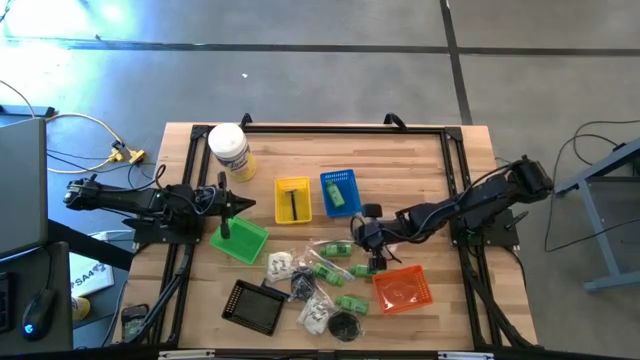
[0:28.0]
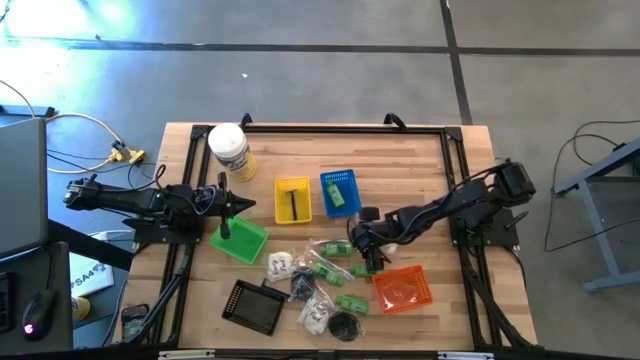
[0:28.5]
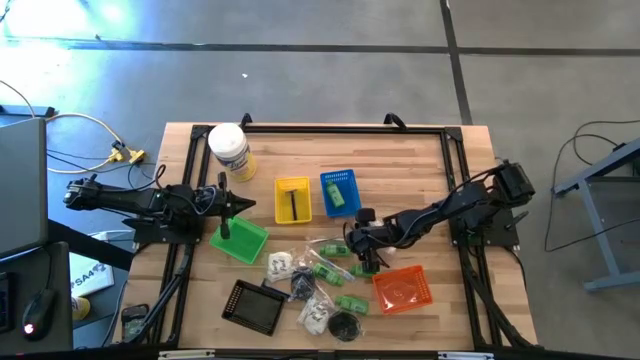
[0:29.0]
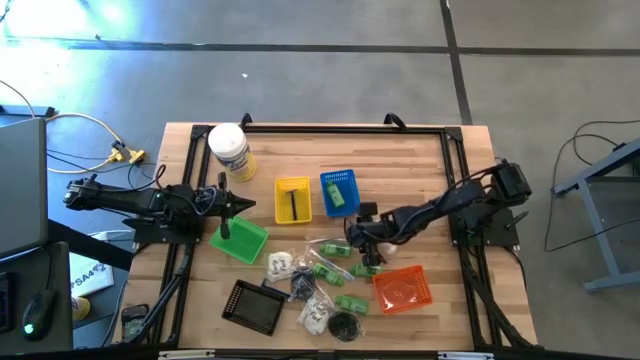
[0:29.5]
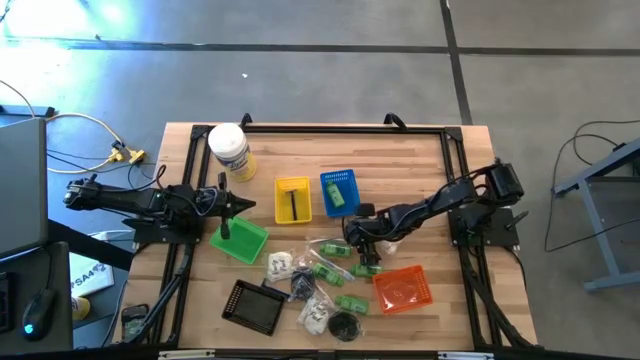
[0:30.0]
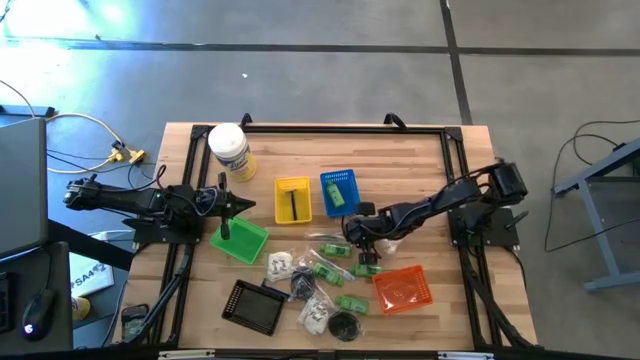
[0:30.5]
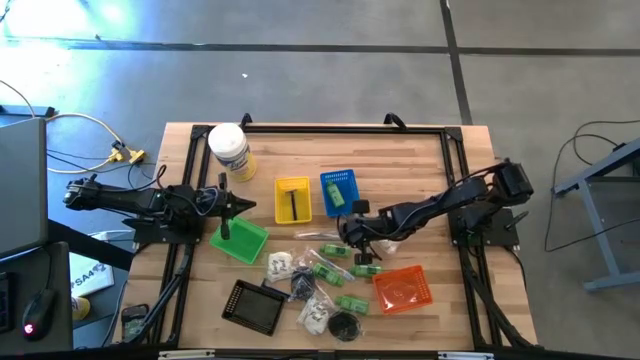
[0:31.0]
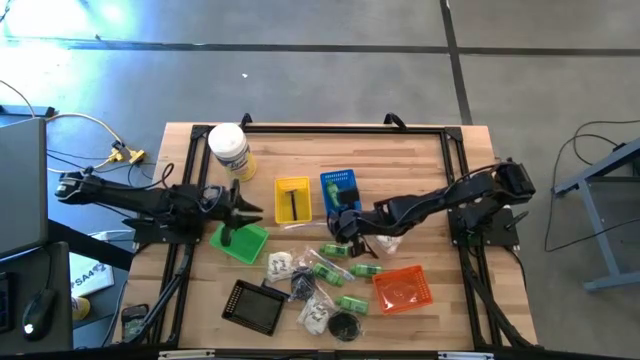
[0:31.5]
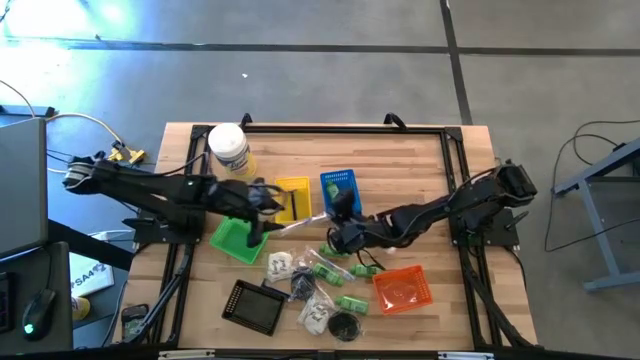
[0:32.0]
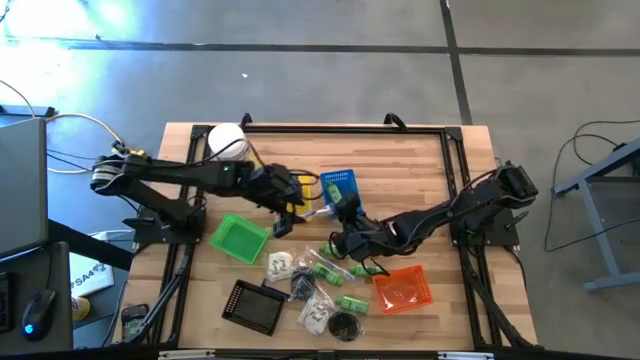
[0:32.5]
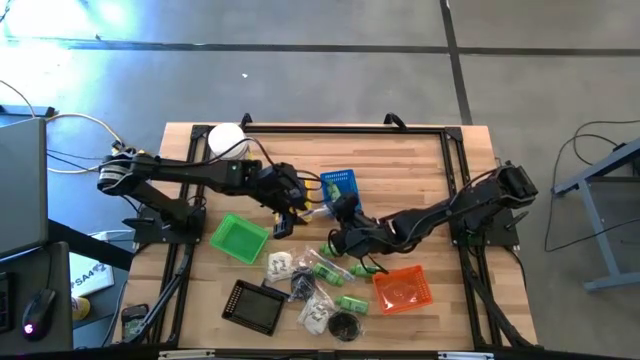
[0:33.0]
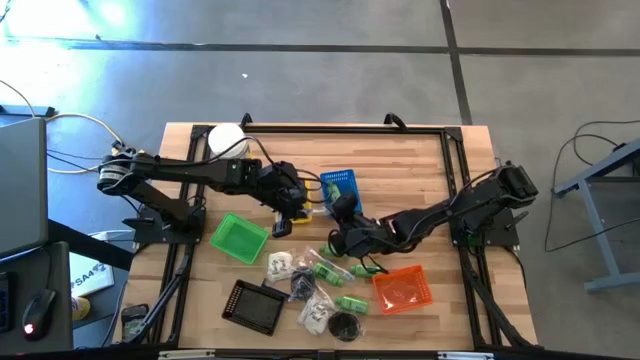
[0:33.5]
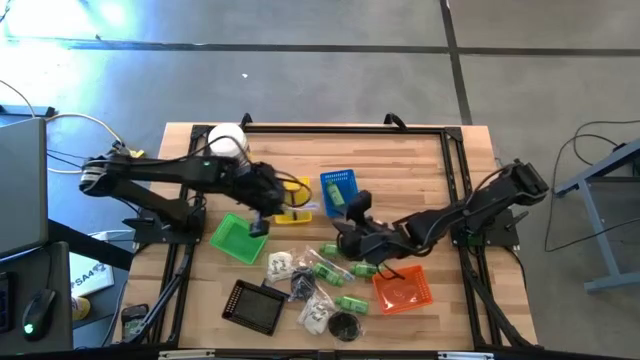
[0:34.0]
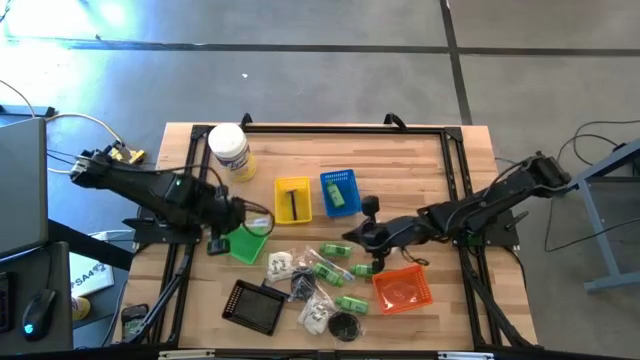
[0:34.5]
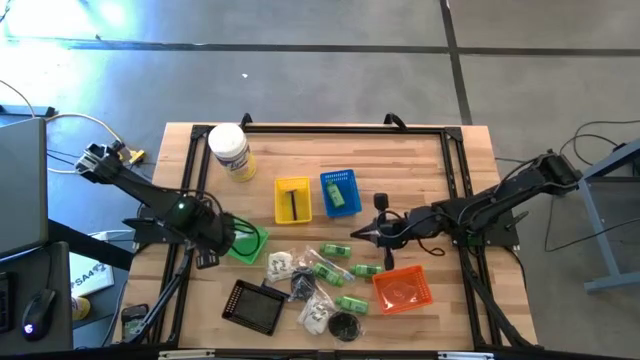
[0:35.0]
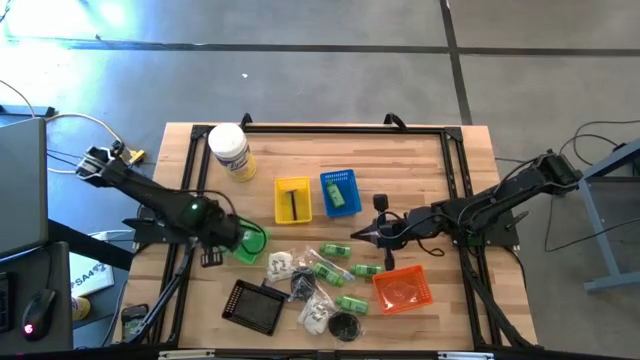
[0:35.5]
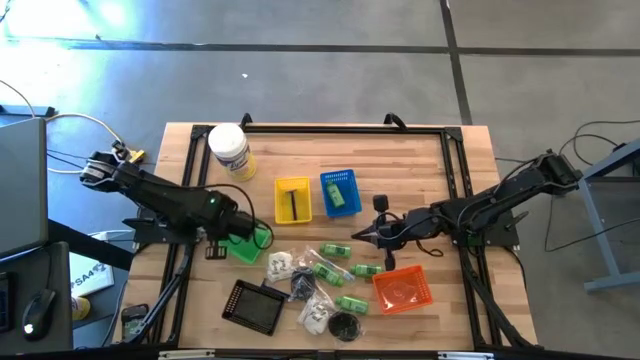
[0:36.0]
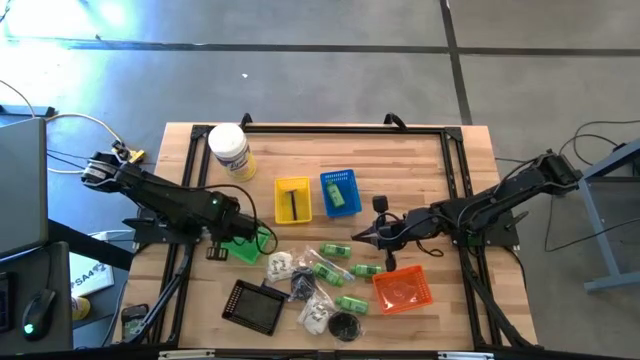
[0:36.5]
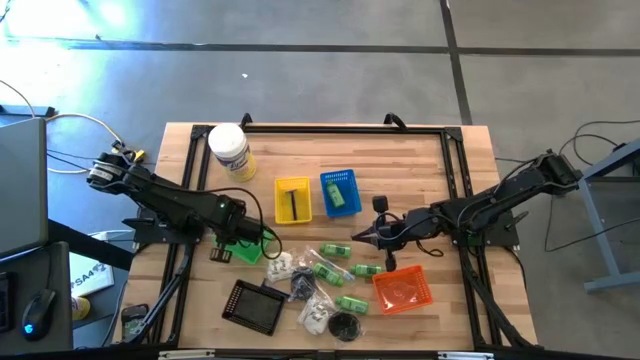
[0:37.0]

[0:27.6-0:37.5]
Task: Pick & Place Travel size toiletries
Put the dark blue toothbrush into the green bin

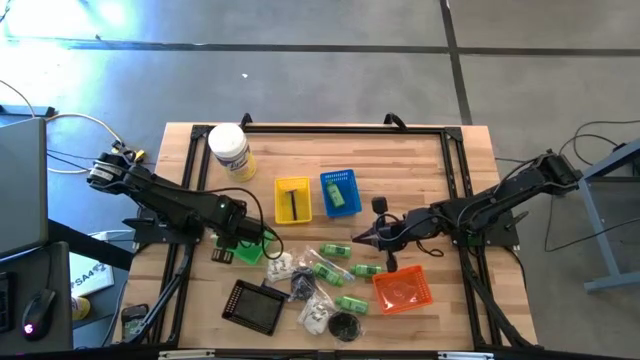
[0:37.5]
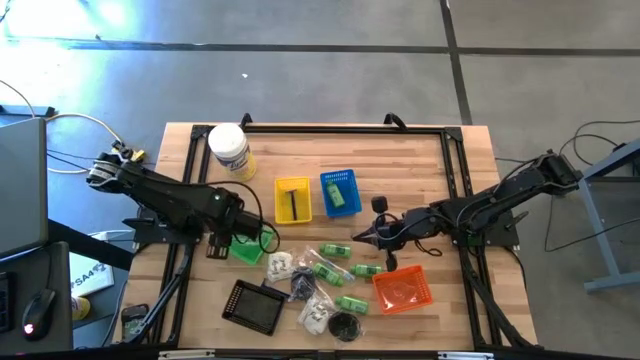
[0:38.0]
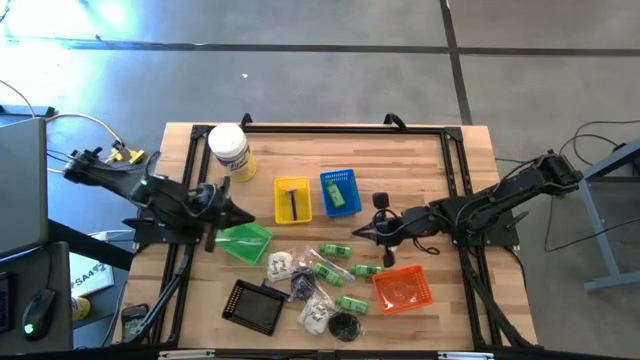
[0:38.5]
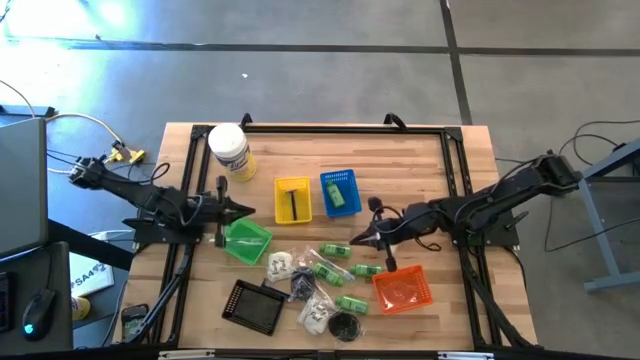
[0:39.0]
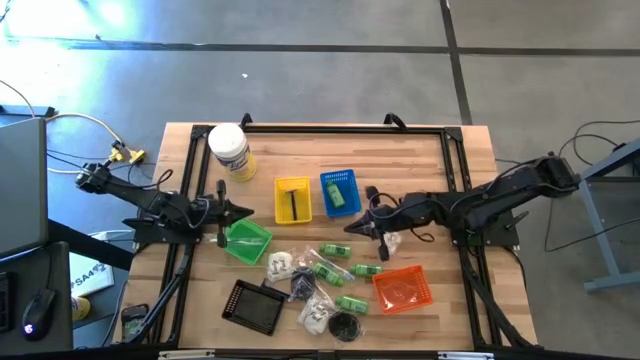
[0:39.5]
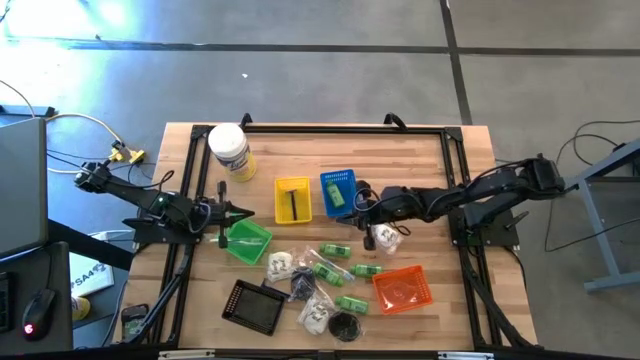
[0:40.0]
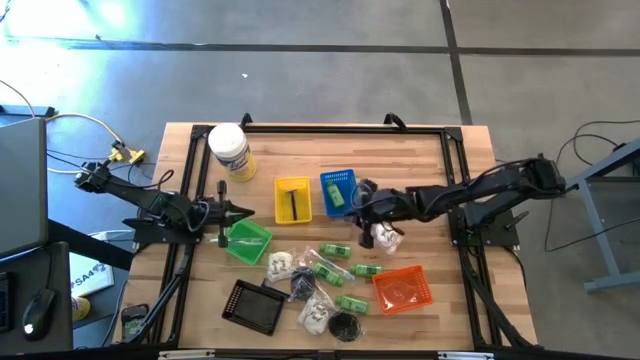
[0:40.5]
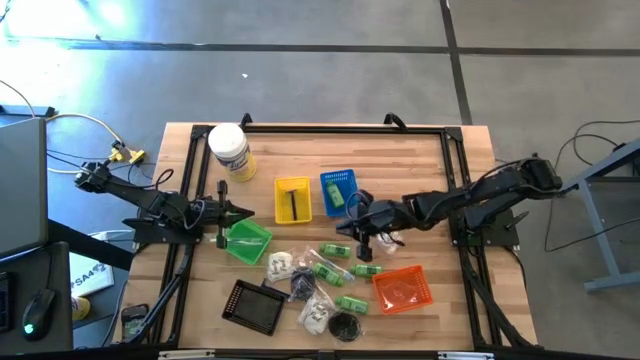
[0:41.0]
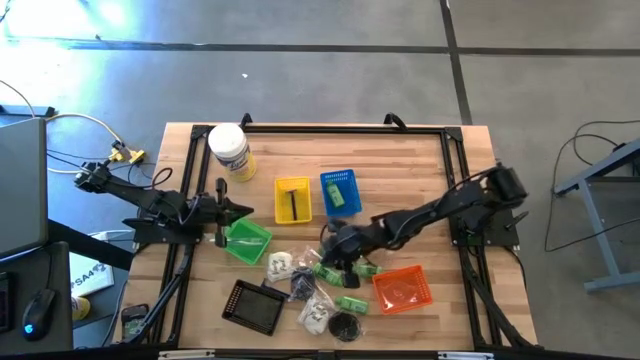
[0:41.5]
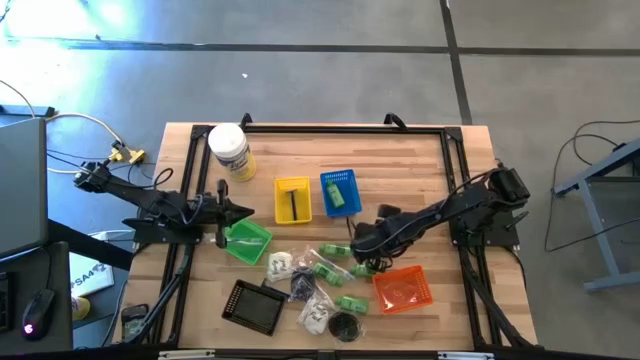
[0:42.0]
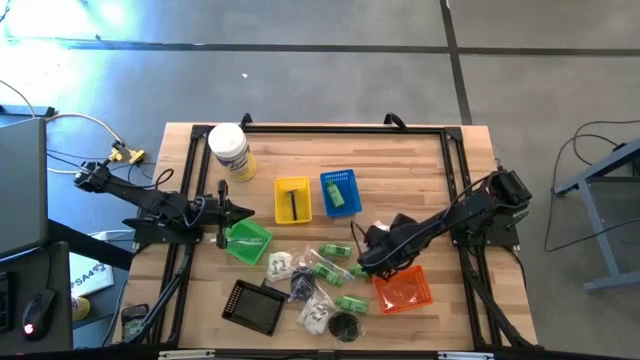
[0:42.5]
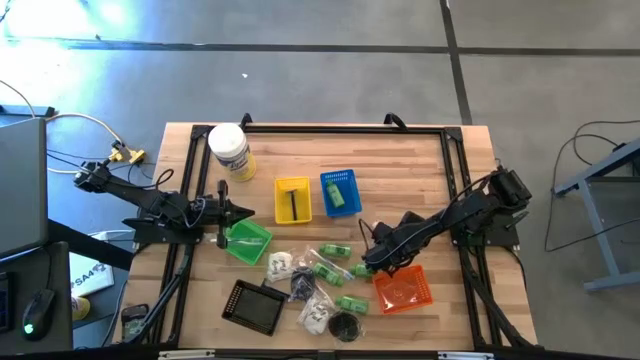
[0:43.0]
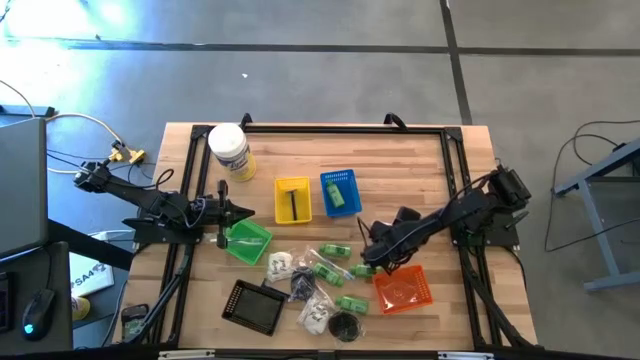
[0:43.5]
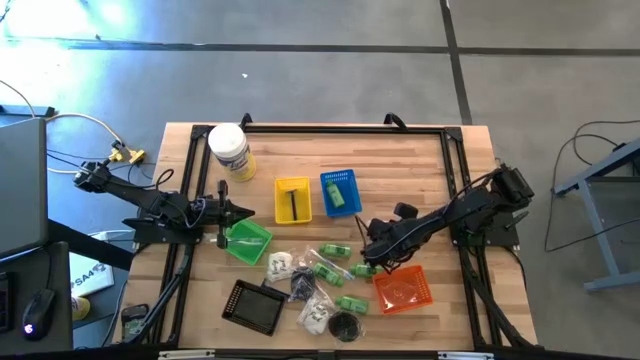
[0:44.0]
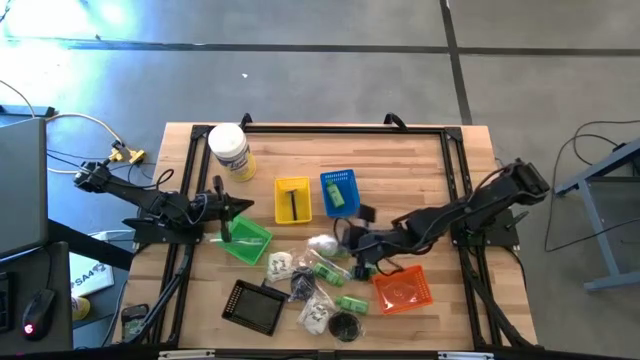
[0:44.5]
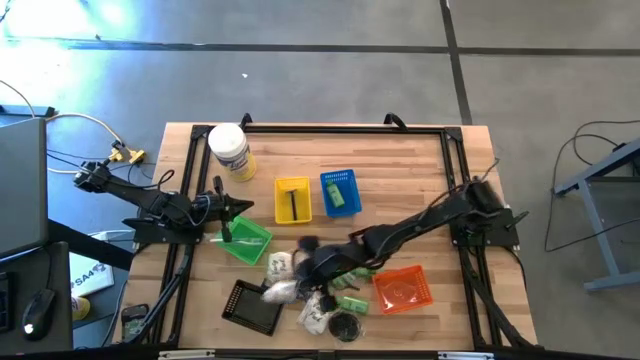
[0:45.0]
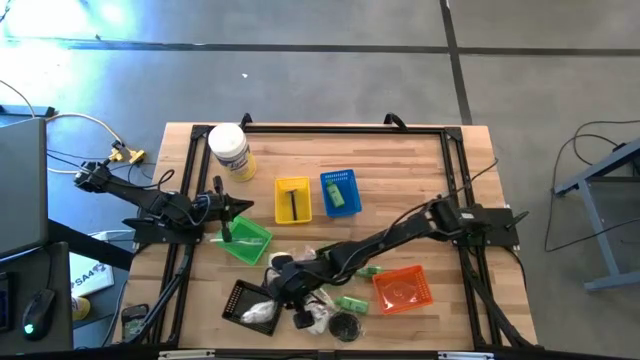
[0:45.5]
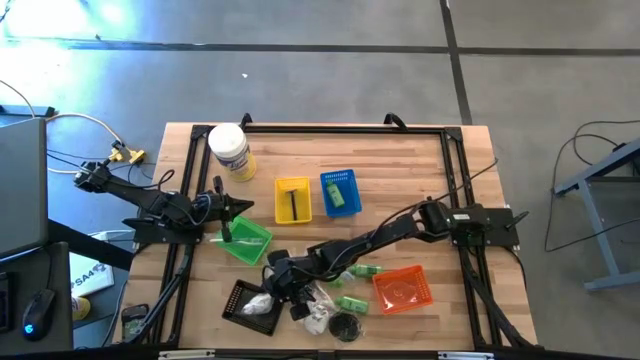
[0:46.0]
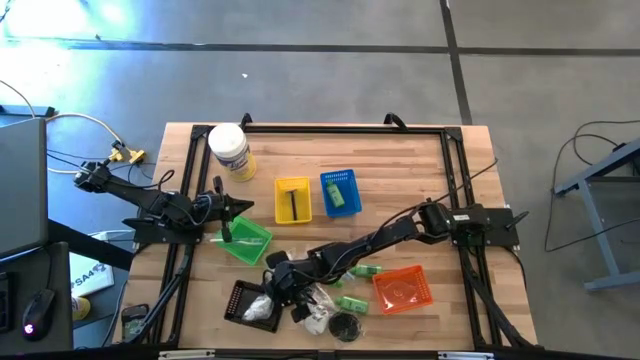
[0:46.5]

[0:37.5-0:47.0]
Put the cotton pack into the black bin

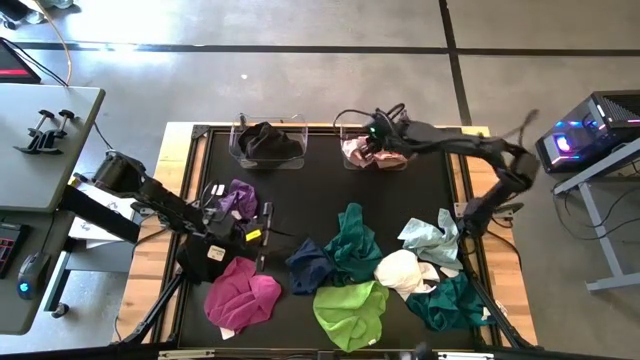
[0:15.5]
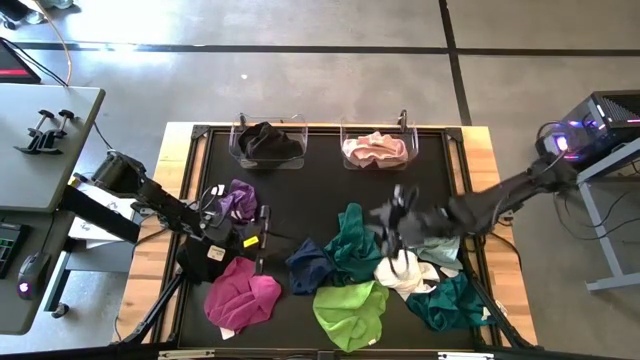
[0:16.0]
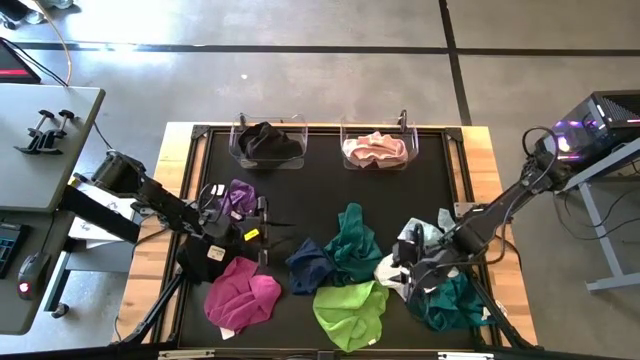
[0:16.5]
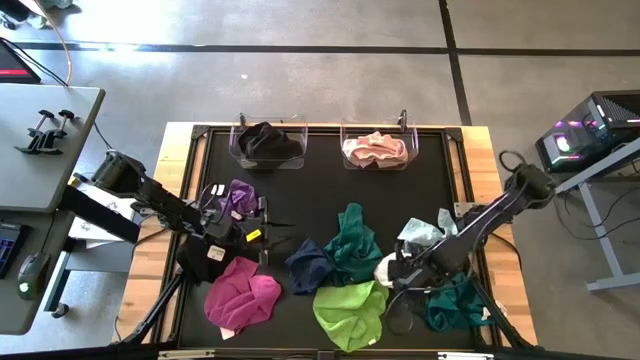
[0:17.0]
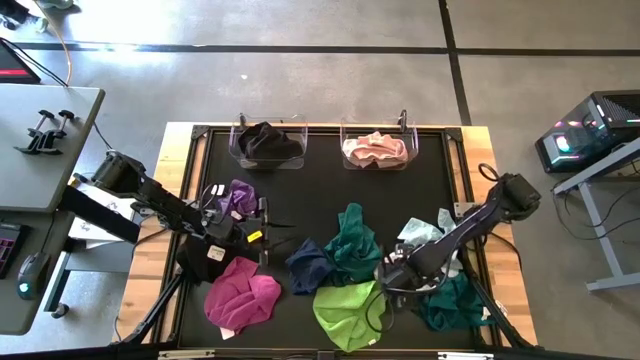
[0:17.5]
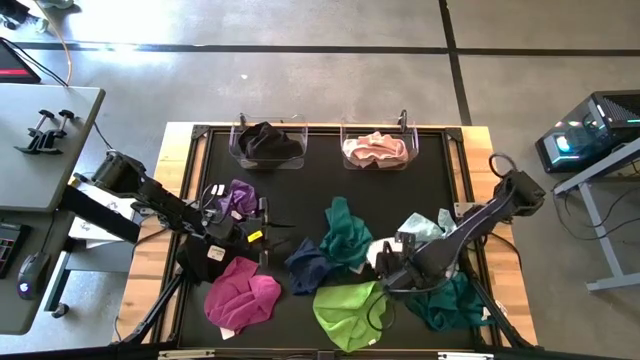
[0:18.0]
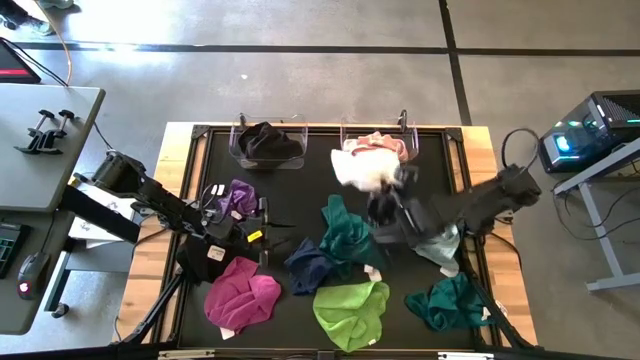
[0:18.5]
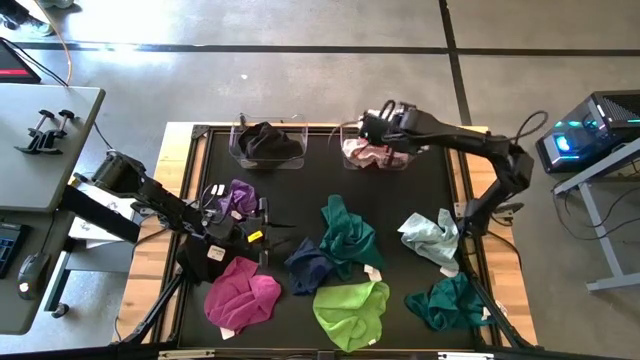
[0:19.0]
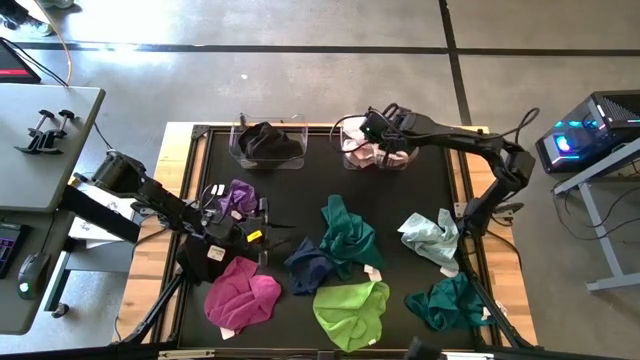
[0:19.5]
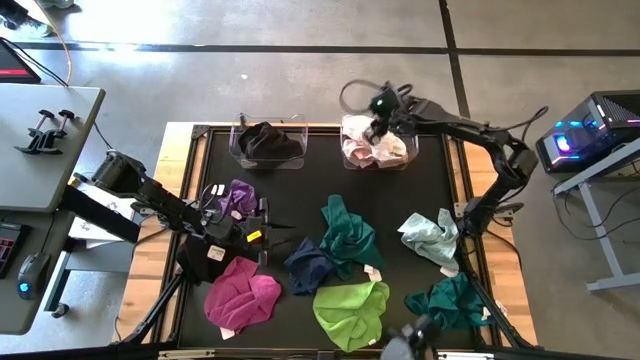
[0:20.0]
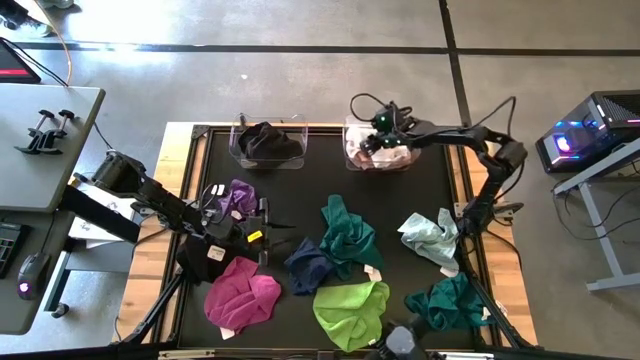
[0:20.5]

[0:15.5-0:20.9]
Task: Sort towels by color in basket
Put the white microfiber towel into the right transparent bin
